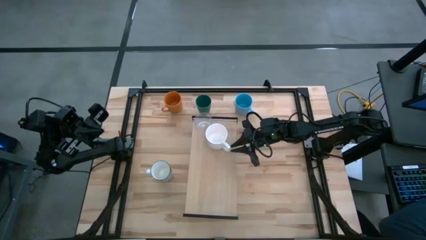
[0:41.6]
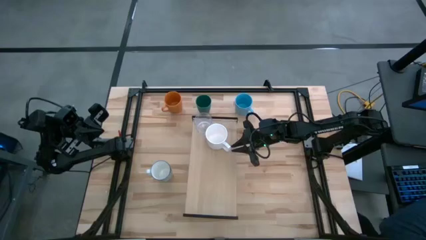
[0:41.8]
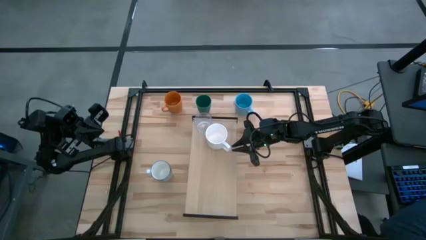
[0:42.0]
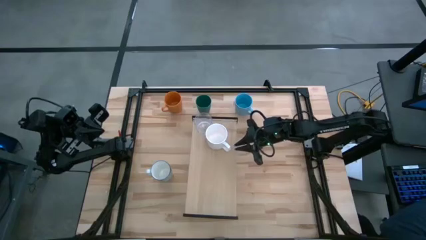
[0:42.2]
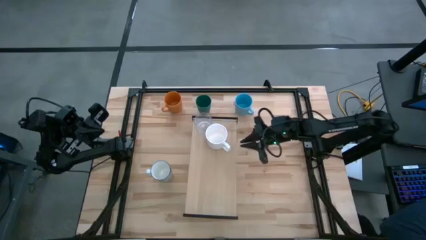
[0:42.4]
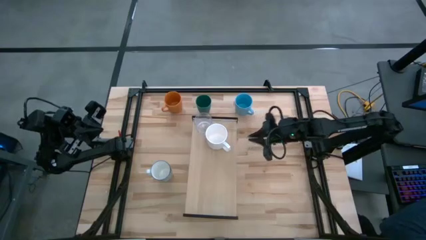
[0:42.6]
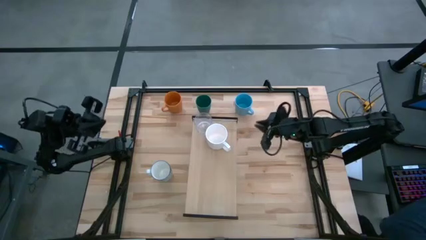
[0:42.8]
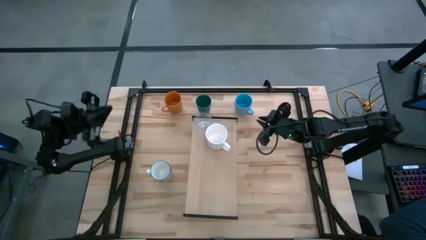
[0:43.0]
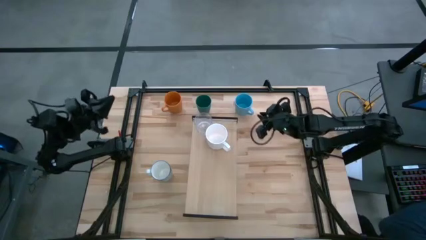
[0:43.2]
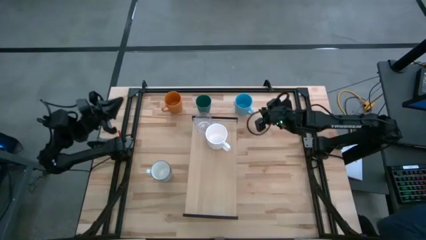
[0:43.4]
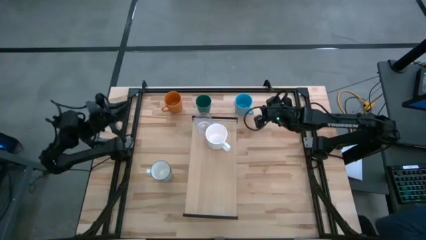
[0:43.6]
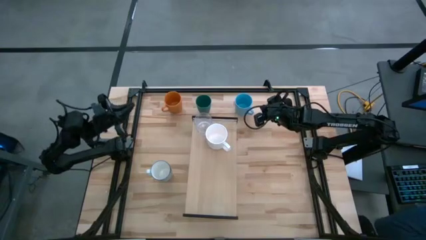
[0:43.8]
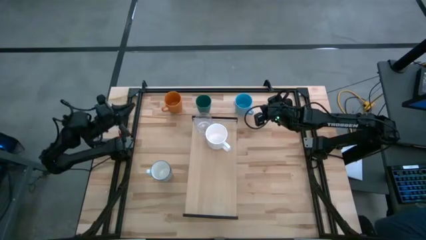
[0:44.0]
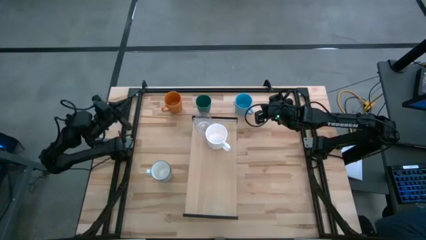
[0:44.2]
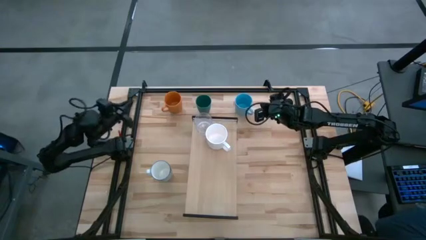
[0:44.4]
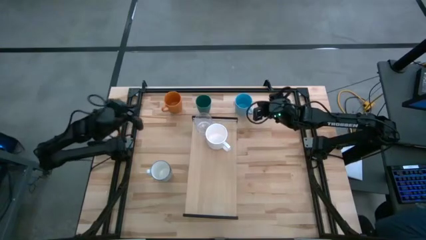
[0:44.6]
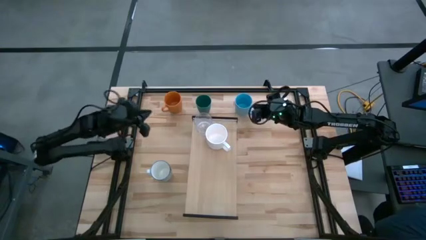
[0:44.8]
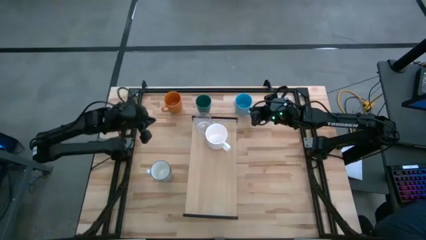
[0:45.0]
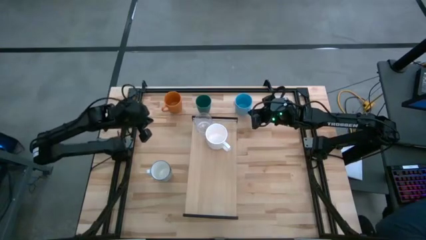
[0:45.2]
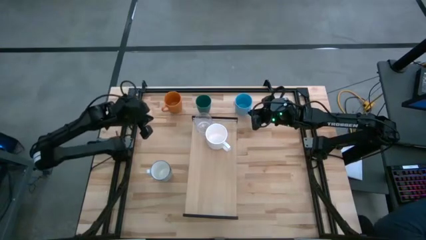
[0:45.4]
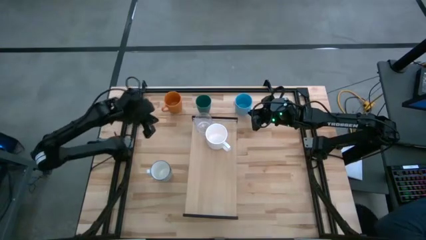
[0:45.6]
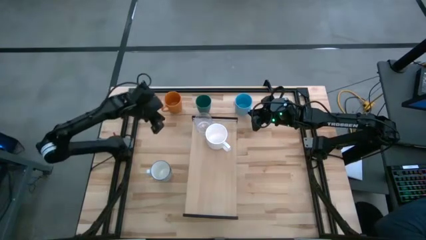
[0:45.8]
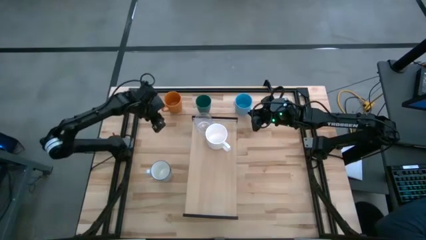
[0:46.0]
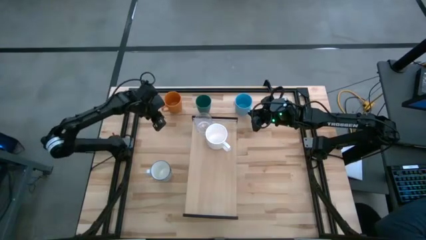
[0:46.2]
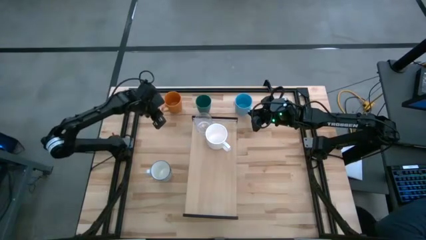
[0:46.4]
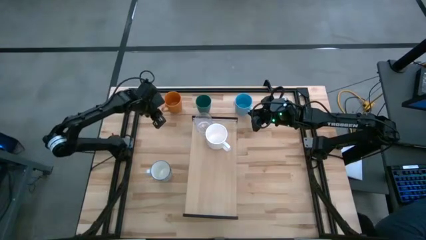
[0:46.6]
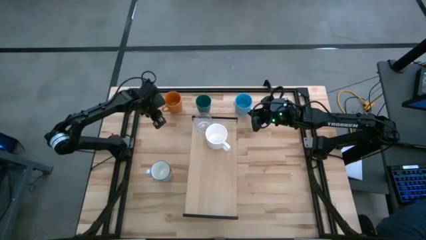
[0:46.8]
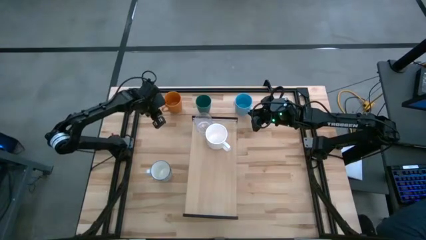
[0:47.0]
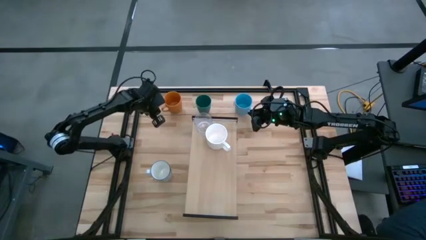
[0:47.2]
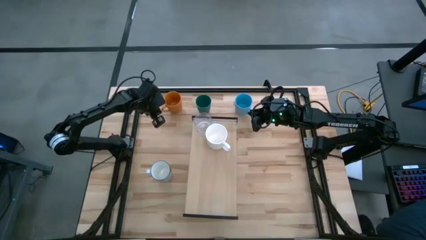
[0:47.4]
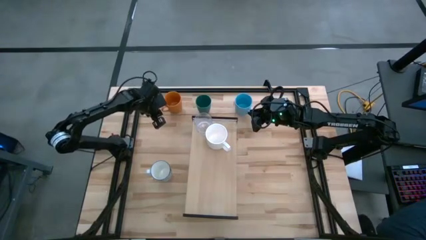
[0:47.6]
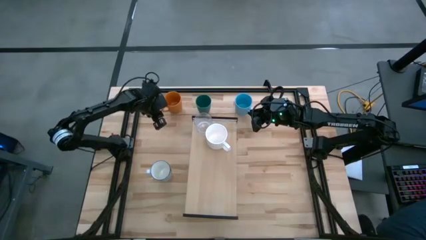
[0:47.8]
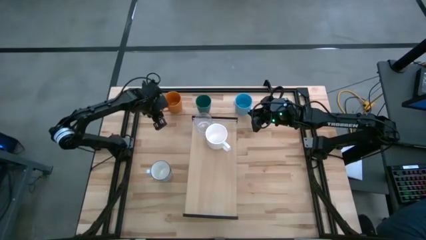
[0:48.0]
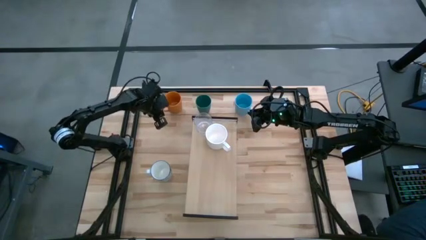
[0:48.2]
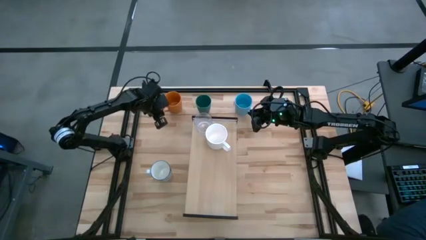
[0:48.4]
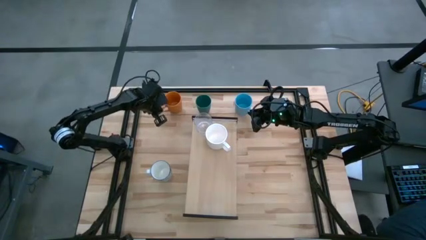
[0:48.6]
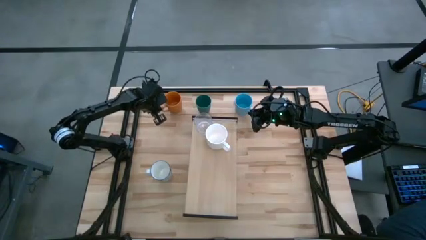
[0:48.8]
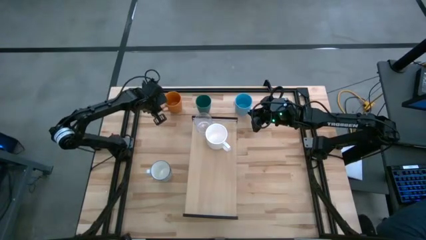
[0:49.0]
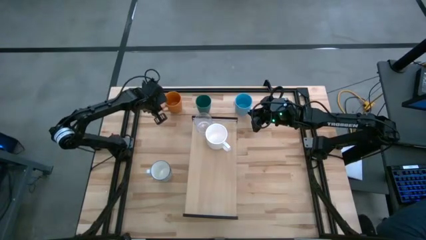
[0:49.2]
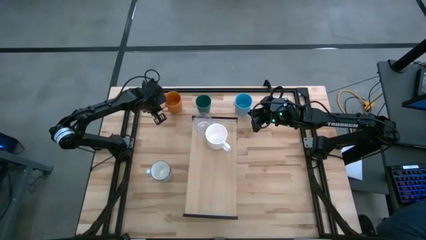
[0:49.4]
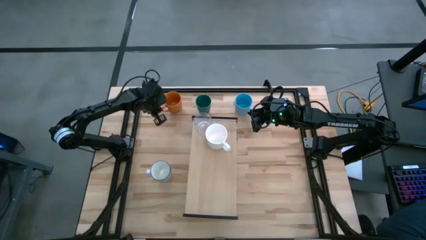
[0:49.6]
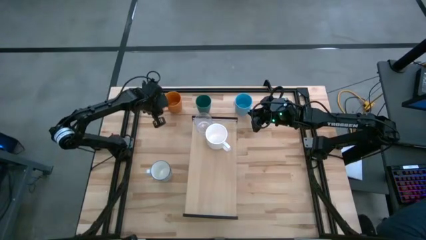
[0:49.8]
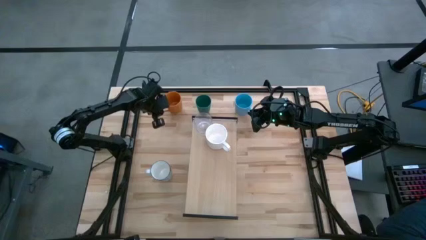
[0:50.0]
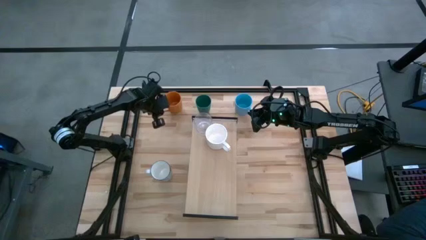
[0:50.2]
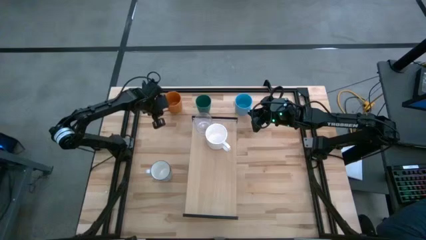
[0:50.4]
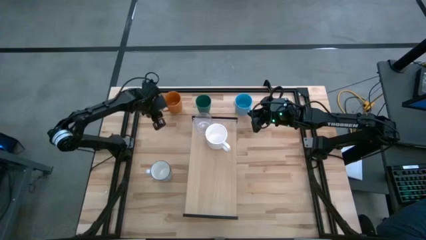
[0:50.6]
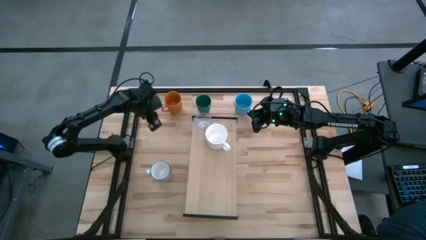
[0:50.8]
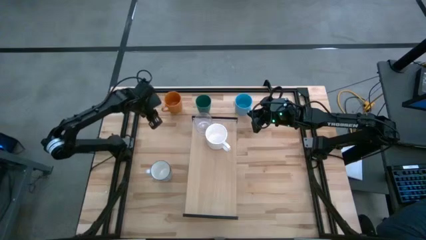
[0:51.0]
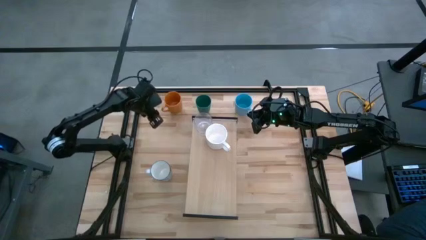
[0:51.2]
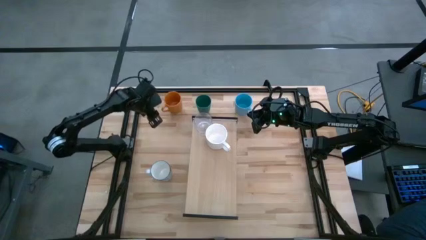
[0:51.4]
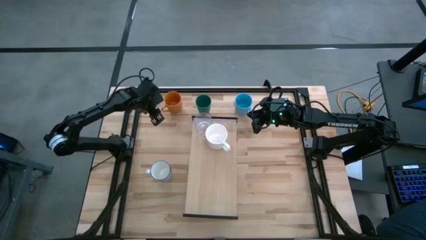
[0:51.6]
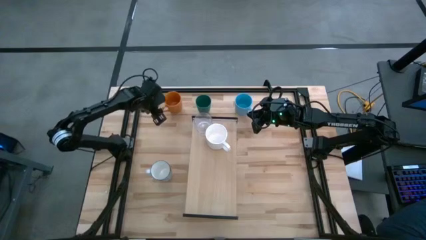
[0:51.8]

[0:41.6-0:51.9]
Task: Stack small to large cups/mugs on shelf
Put the orange mug on the shelf
